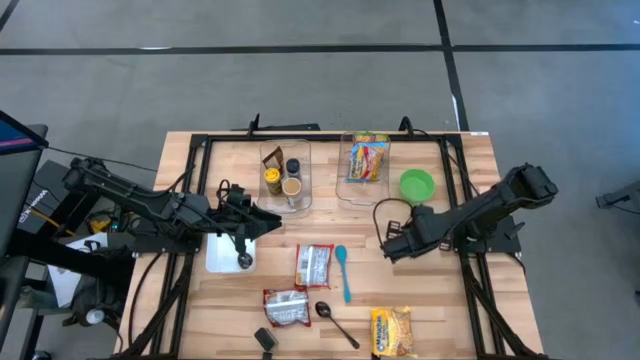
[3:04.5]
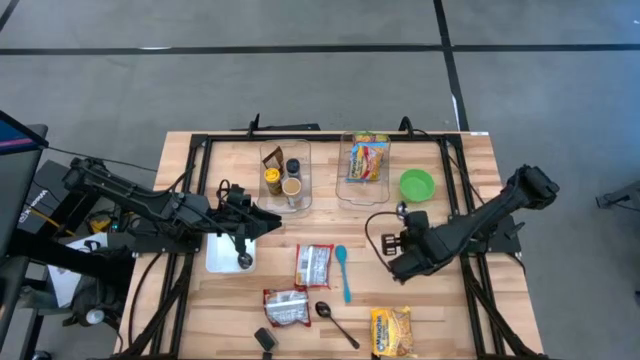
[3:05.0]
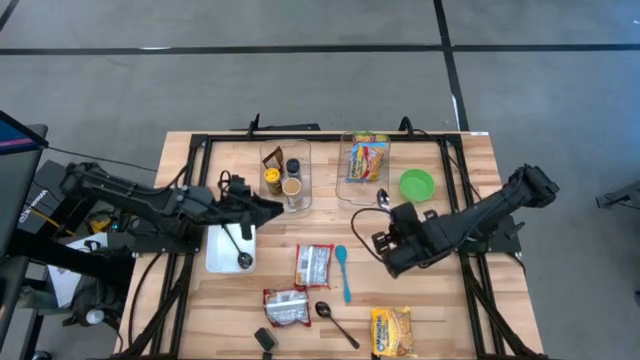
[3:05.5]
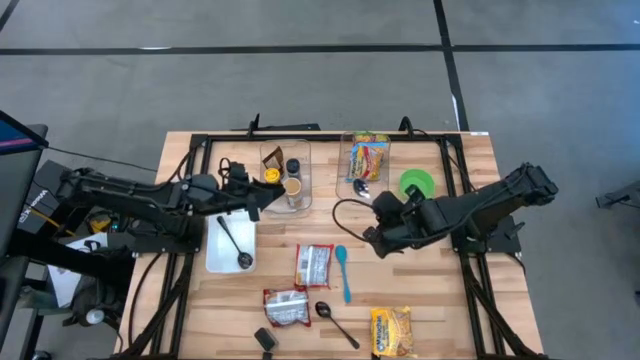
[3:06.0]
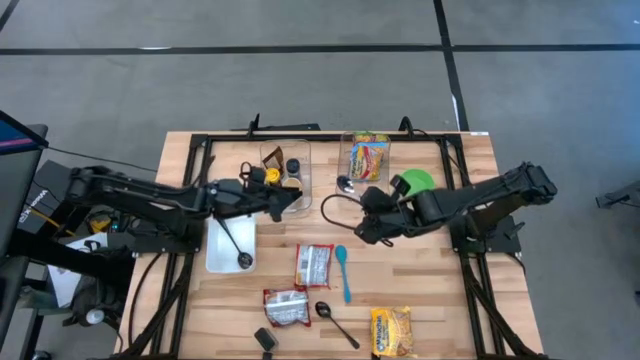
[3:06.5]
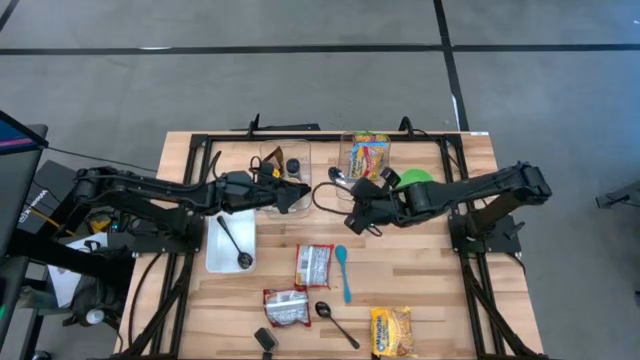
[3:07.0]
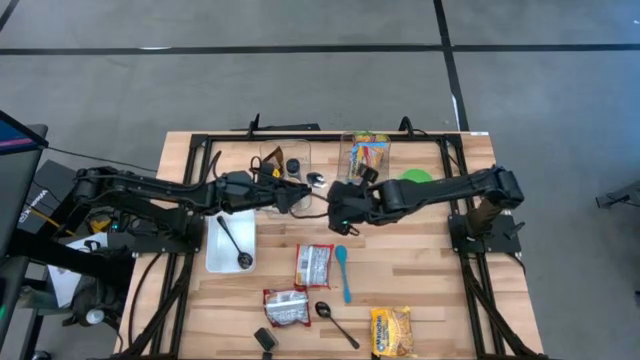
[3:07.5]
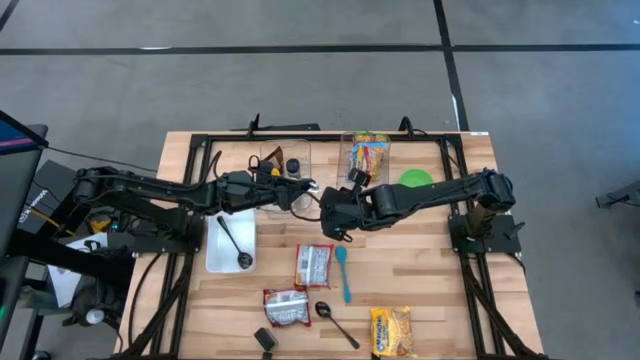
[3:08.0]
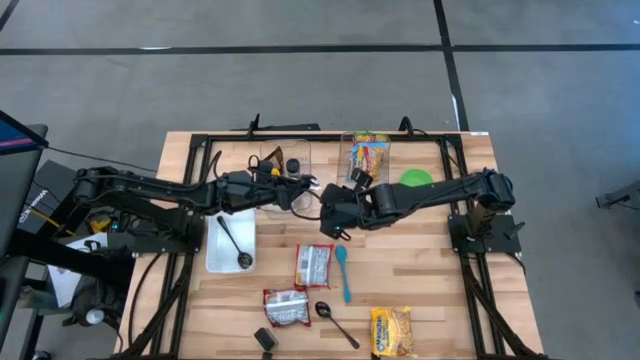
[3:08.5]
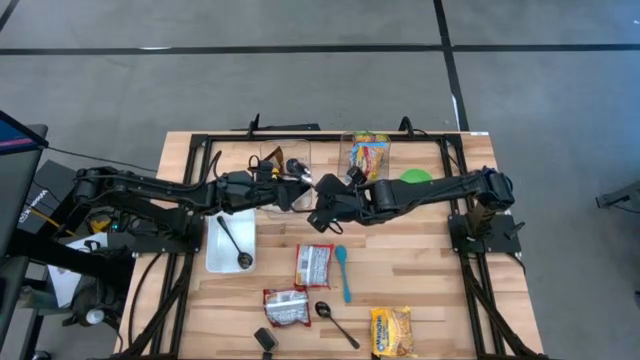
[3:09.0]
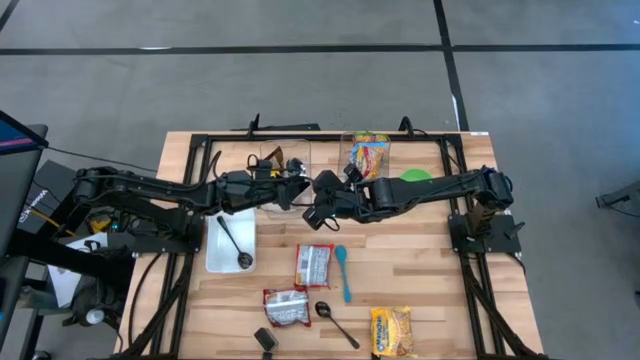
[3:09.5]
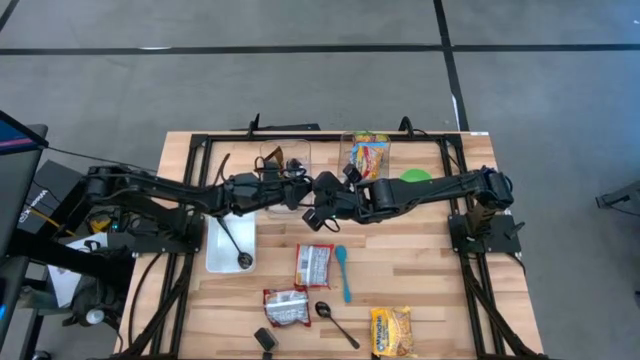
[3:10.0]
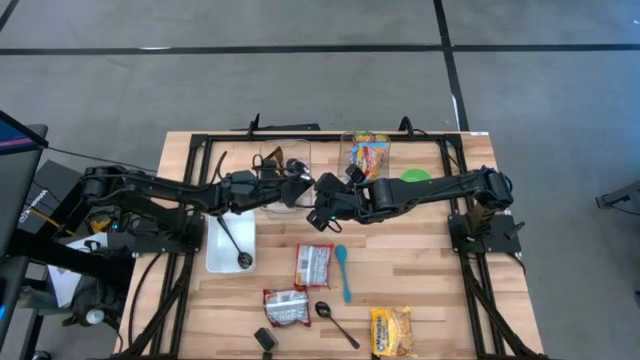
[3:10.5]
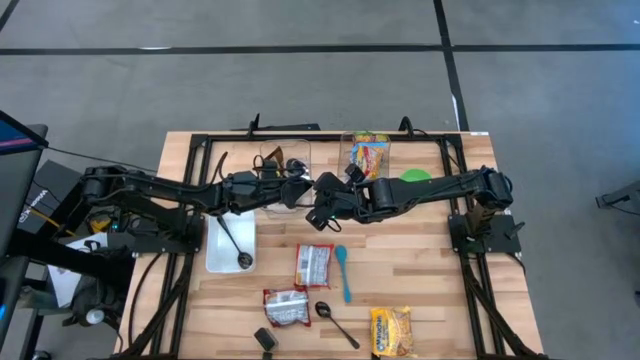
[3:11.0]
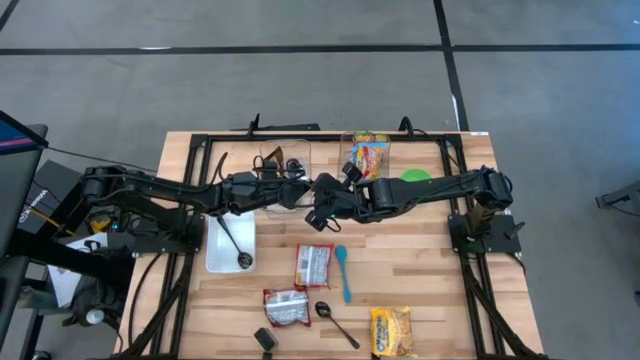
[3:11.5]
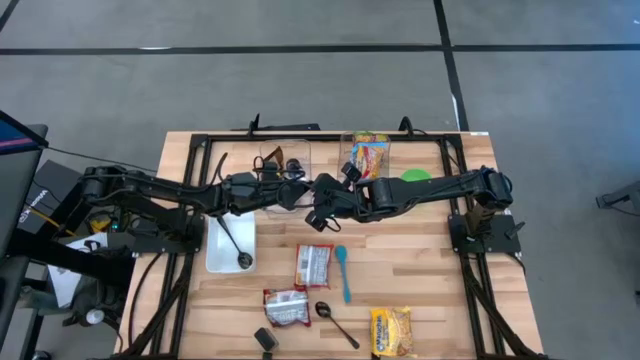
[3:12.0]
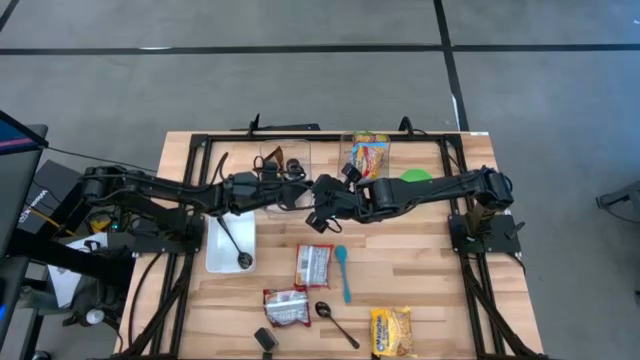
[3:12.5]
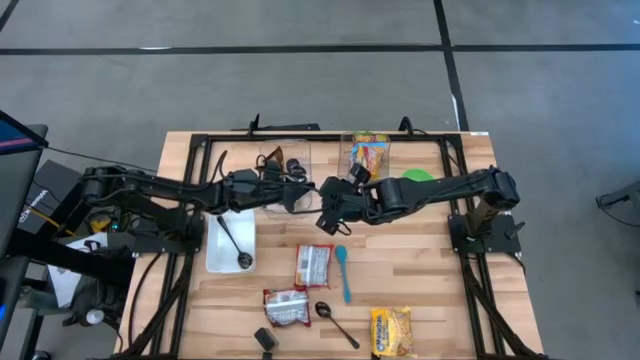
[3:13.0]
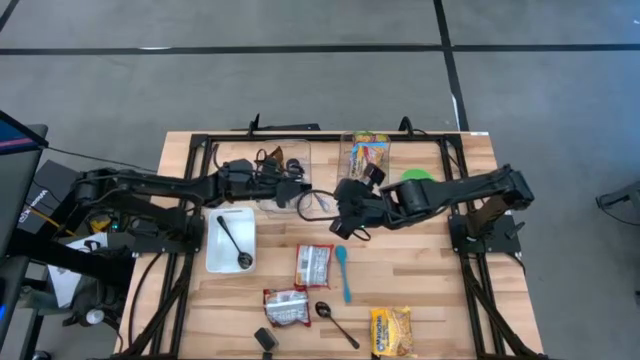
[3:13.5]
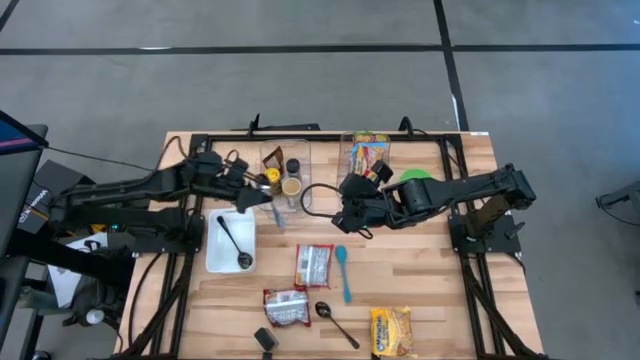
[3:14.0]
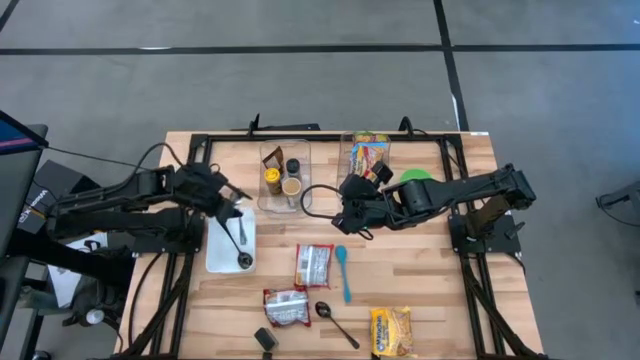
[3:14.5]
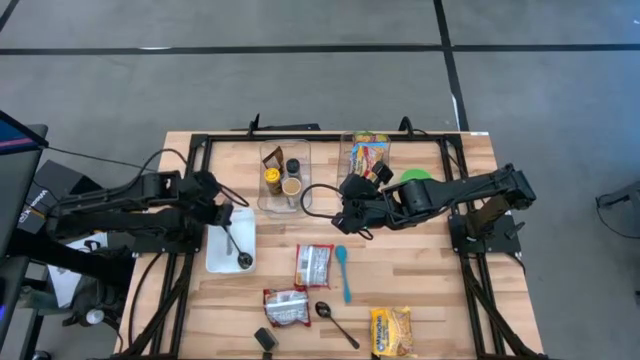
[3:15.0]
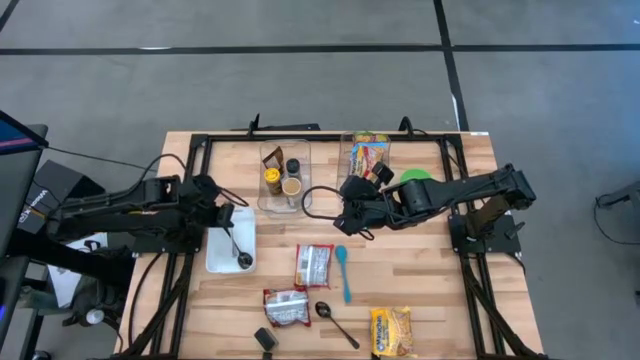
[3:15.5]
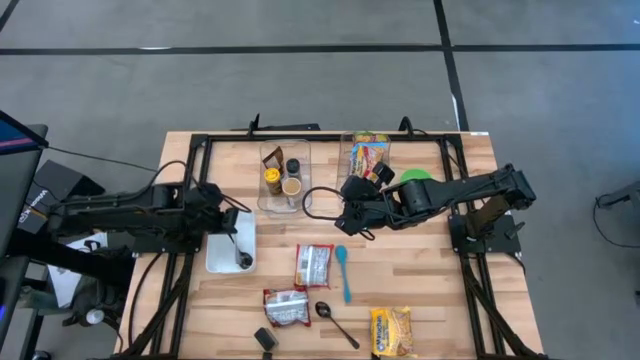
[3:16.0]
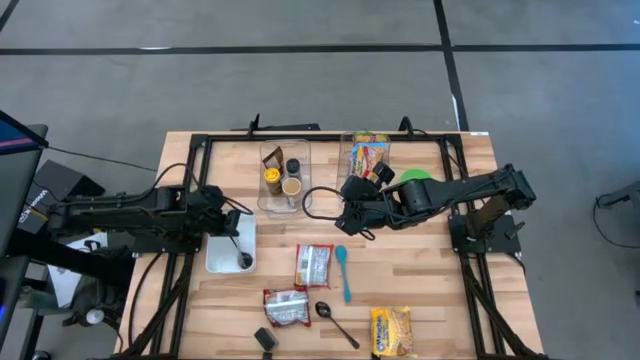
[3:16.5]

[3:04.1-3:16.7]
Task: Pick & Place Food Item
Put the silver spoon into the white bin

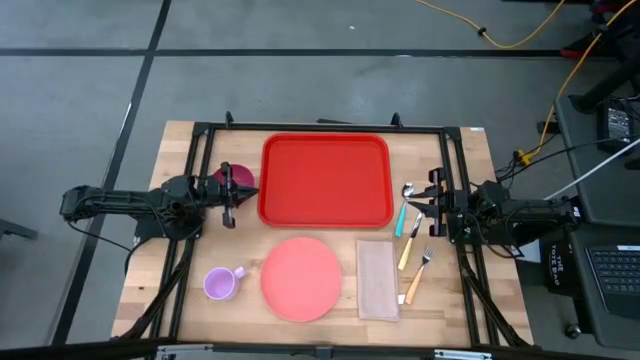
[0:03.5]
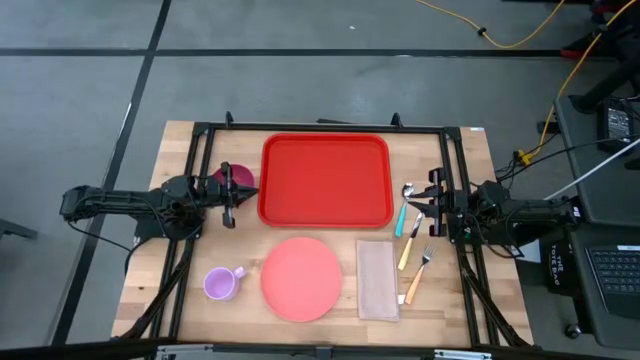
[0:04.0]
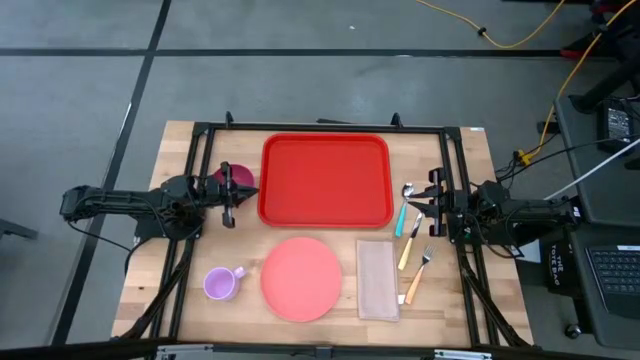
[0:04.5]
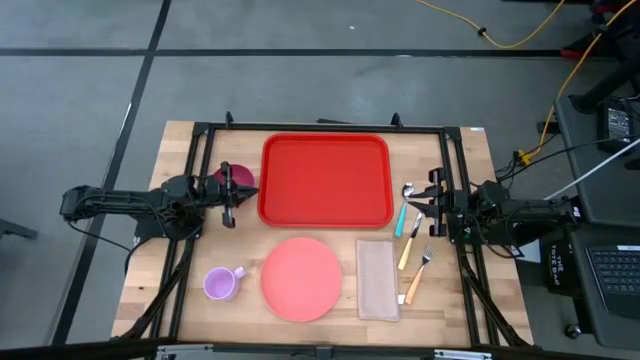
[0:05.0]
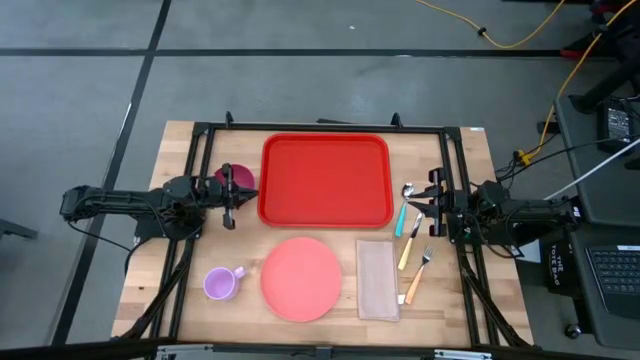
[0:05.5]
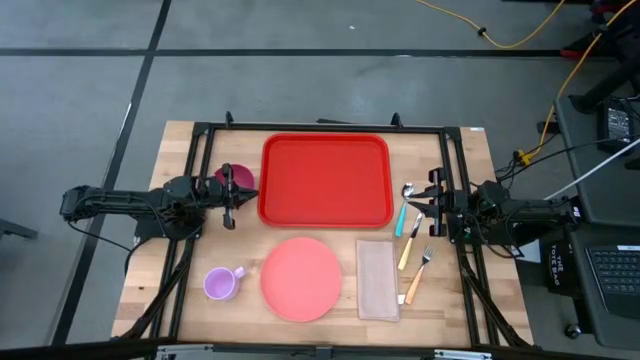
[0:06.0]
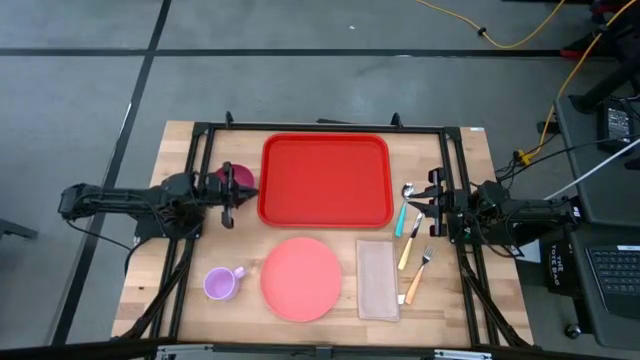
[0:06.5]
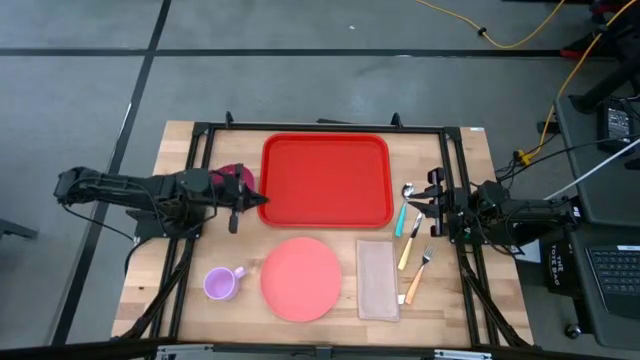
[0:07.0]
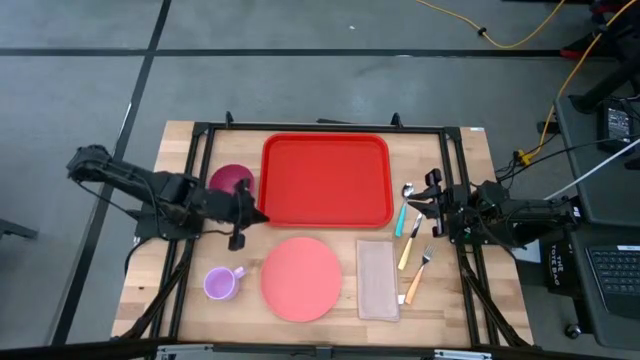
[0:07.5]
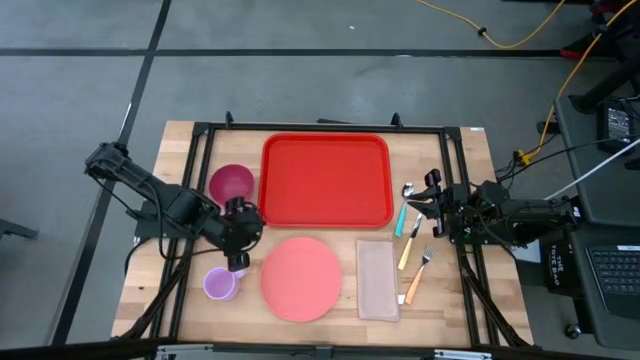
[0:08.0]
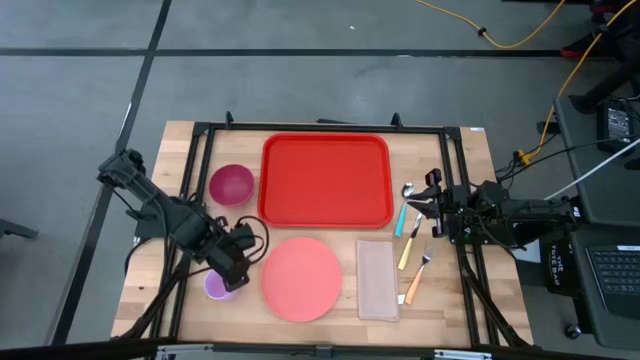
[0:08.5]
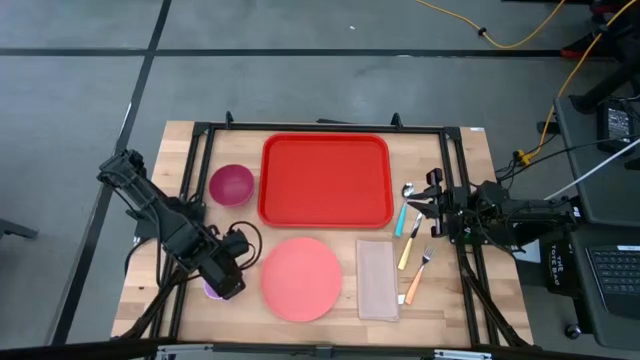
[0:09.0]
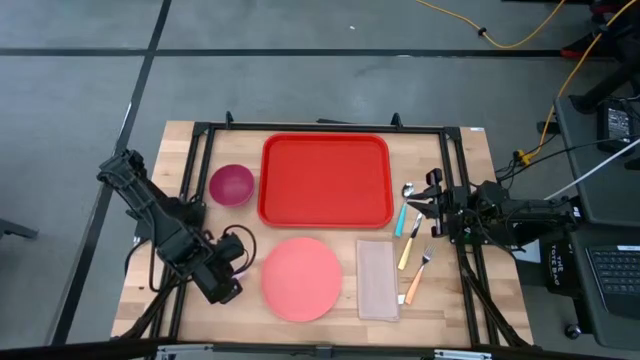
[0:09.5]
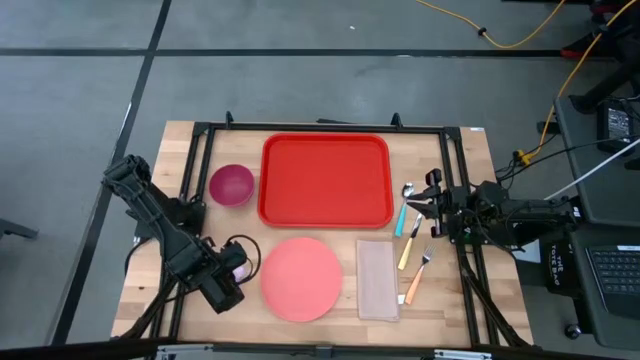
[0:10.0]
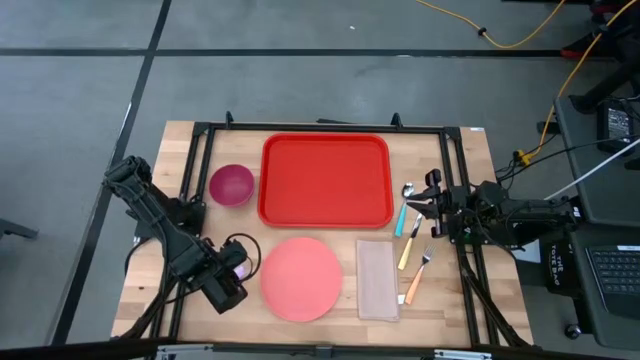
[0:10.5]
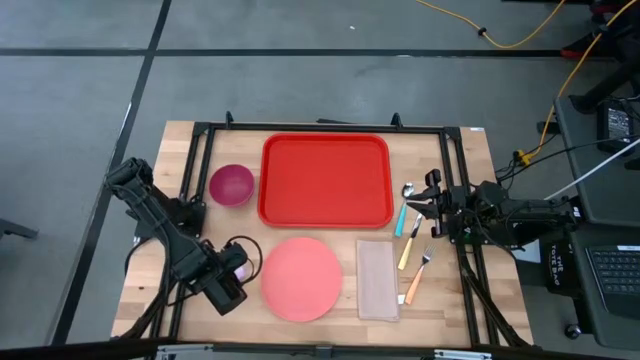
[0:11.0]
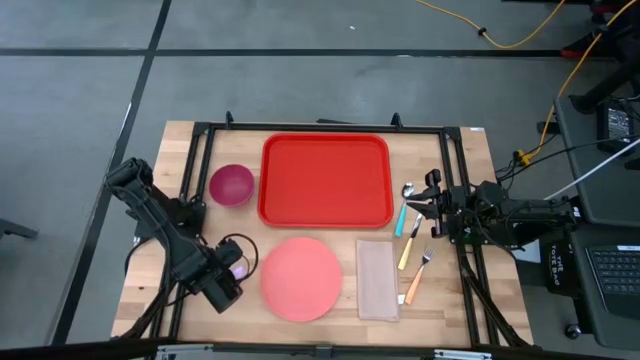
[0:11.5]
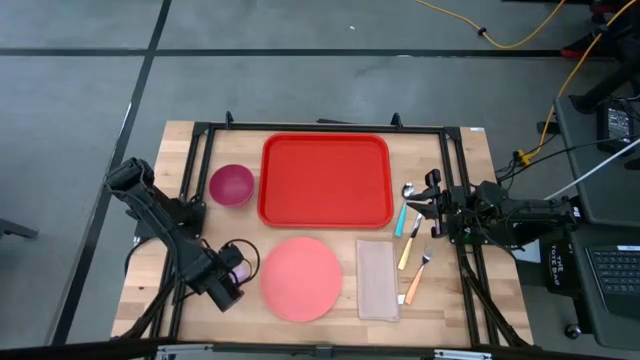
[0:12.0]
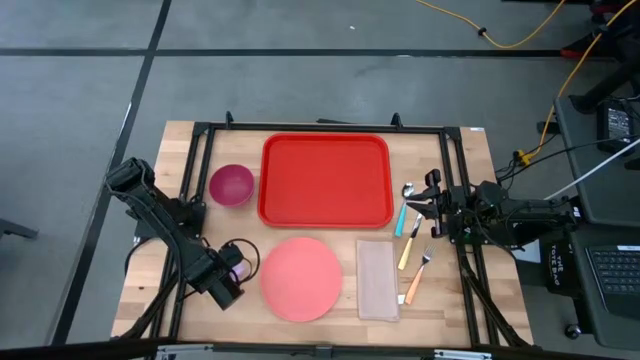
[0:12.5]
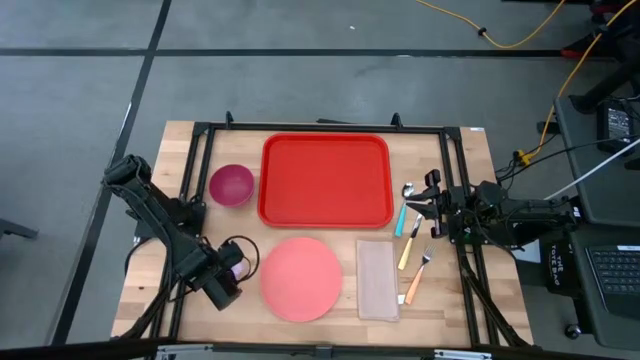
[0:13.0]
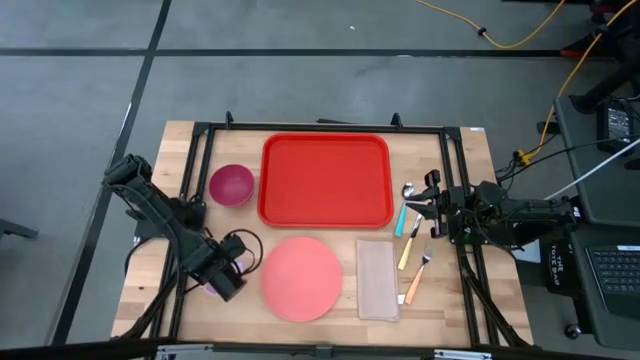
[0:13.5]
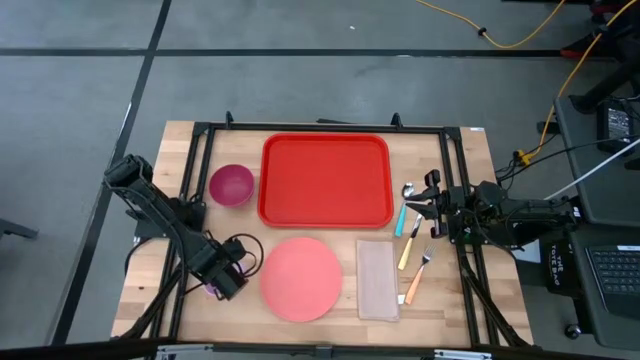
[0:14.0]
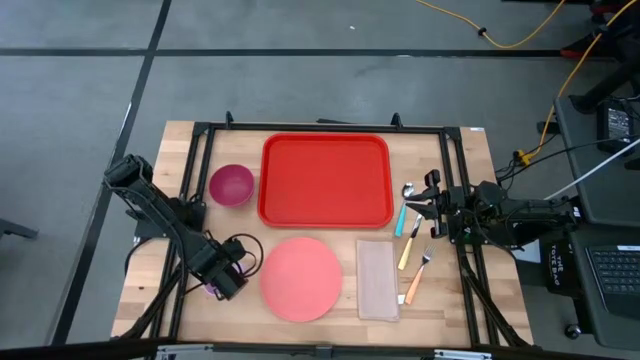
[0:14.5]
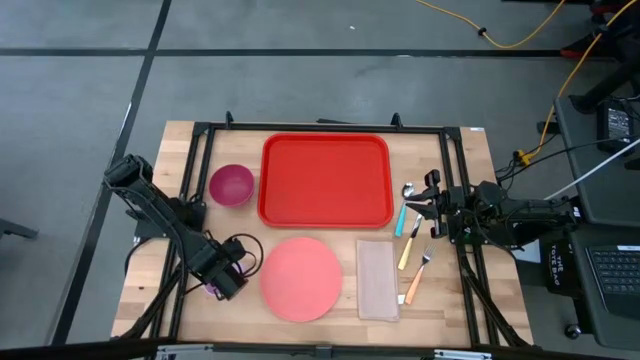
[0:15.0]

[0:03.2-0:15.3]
Task: Set up tray
Put the purple mug on the top left of the red tray
